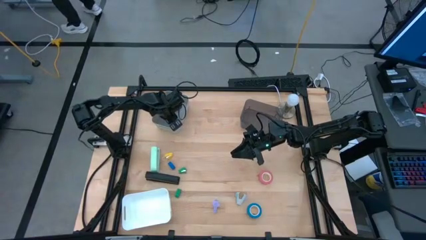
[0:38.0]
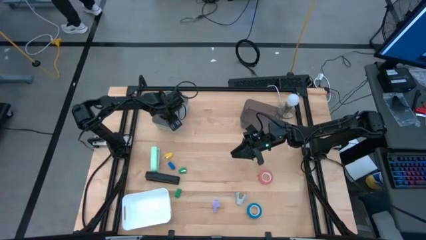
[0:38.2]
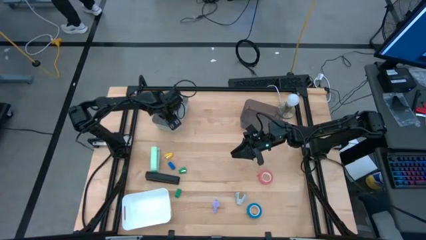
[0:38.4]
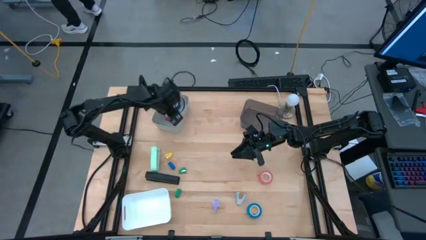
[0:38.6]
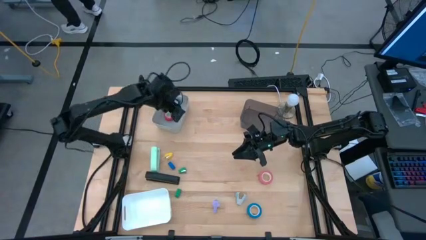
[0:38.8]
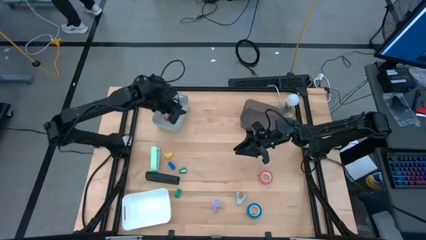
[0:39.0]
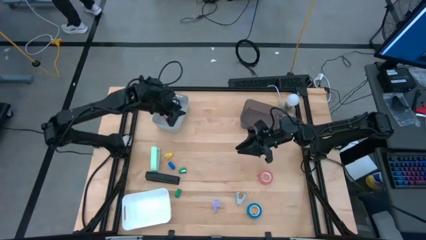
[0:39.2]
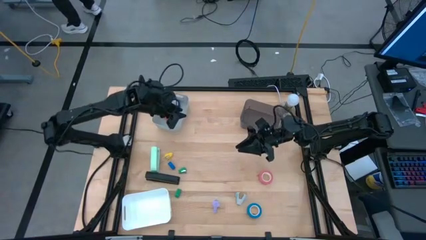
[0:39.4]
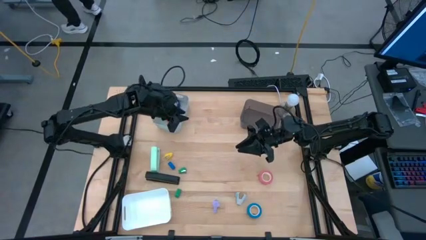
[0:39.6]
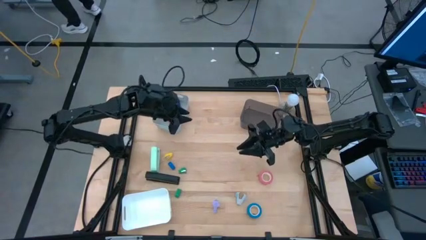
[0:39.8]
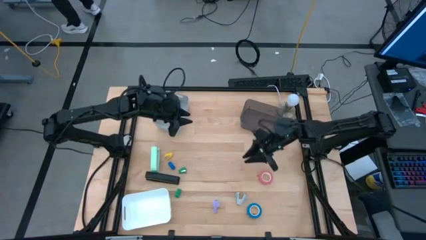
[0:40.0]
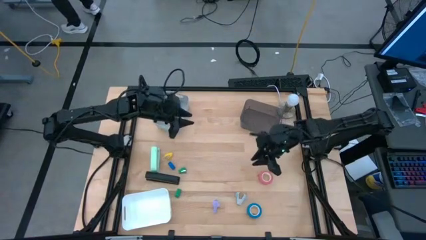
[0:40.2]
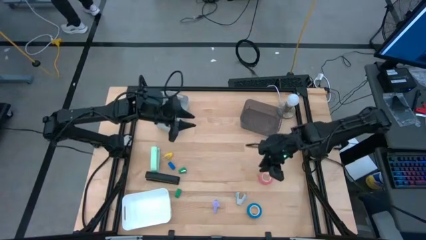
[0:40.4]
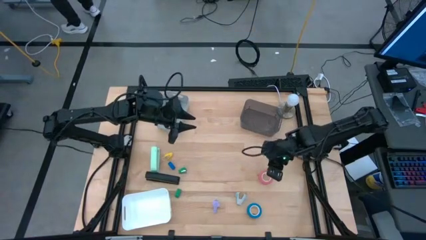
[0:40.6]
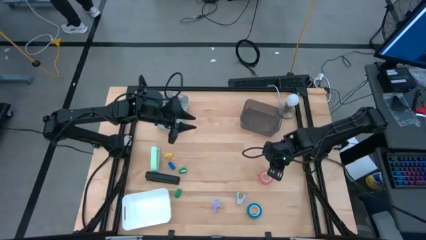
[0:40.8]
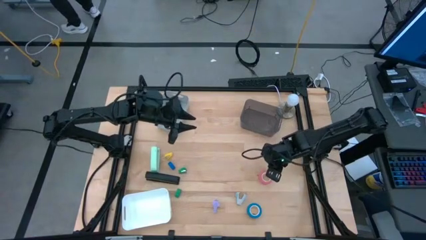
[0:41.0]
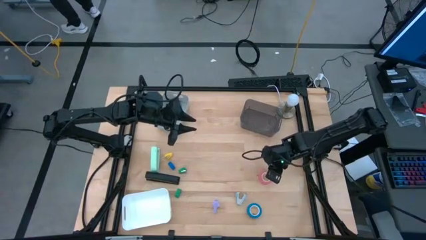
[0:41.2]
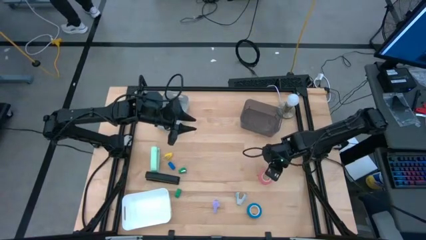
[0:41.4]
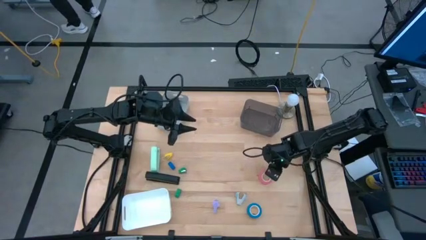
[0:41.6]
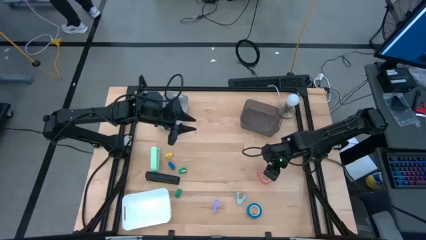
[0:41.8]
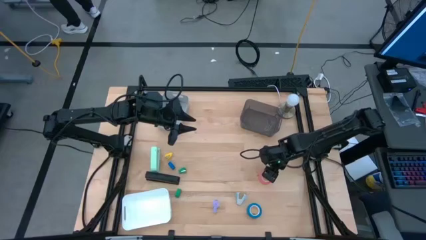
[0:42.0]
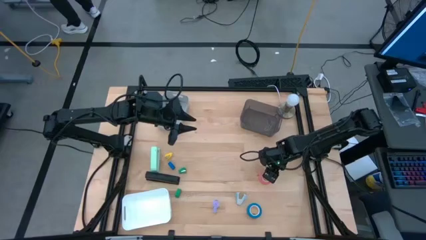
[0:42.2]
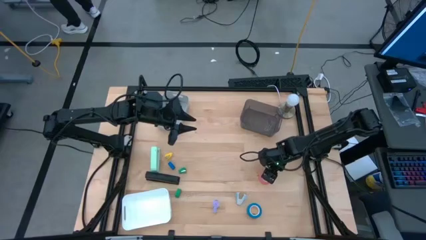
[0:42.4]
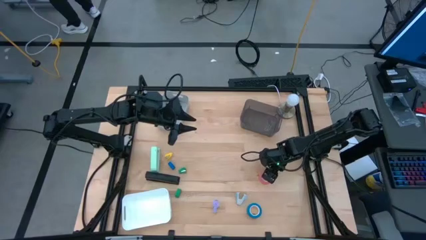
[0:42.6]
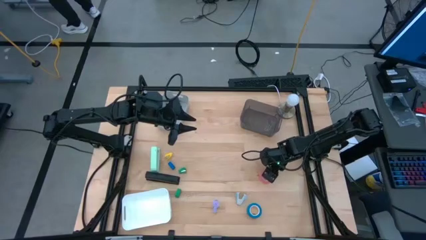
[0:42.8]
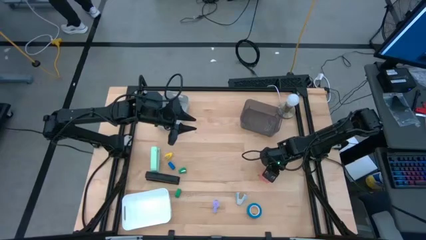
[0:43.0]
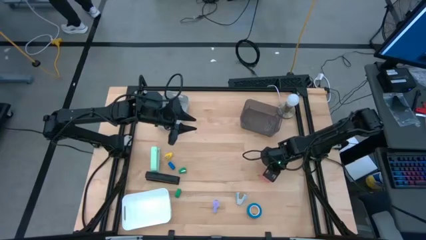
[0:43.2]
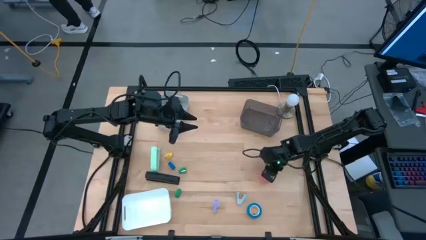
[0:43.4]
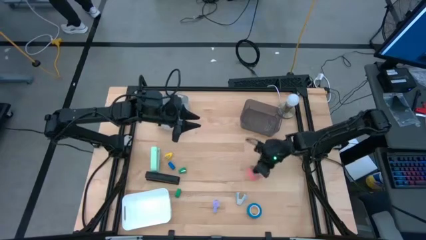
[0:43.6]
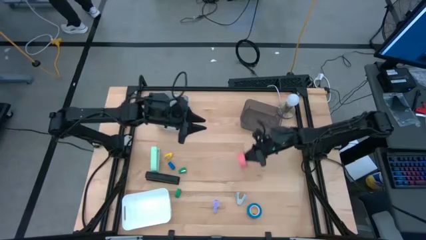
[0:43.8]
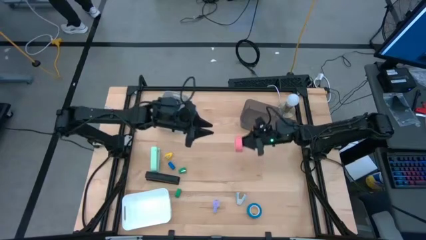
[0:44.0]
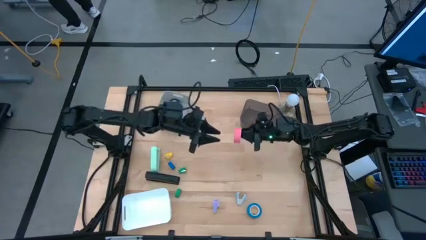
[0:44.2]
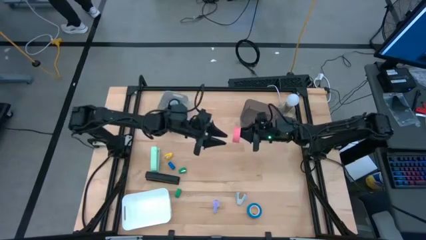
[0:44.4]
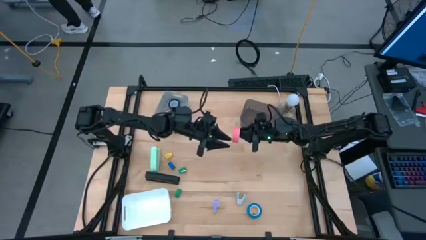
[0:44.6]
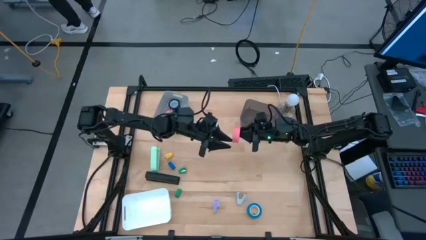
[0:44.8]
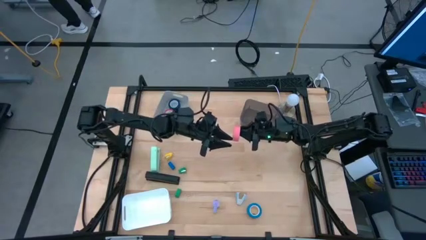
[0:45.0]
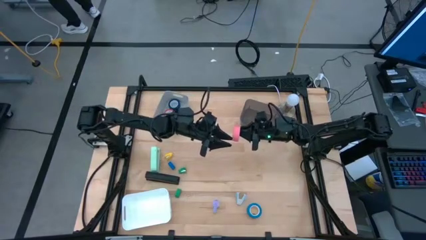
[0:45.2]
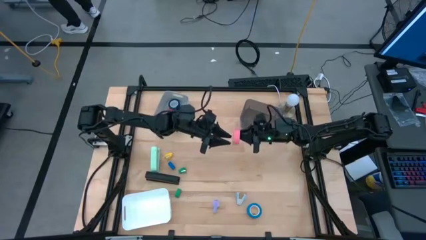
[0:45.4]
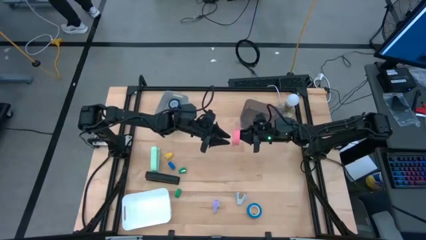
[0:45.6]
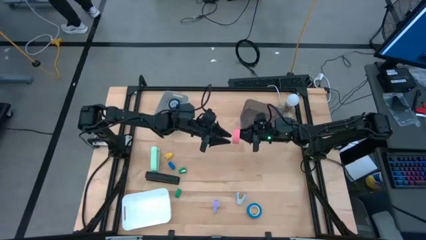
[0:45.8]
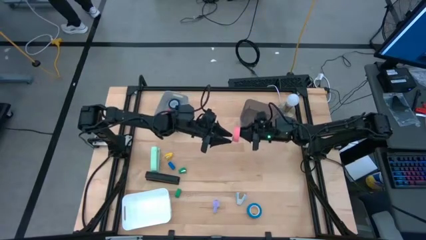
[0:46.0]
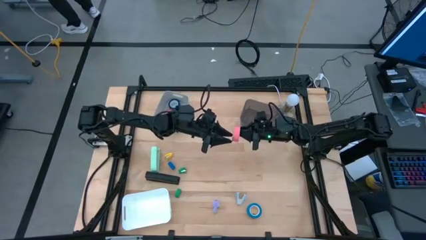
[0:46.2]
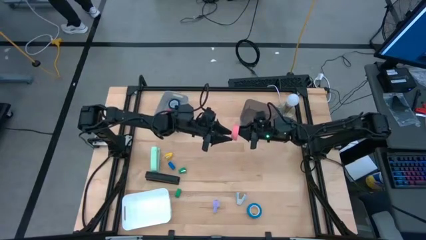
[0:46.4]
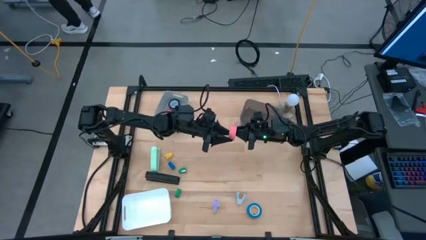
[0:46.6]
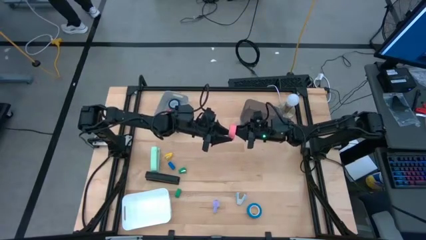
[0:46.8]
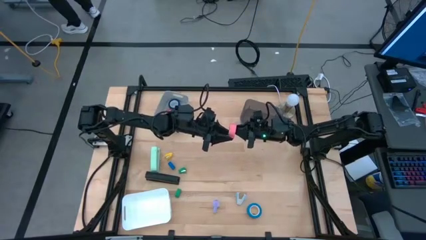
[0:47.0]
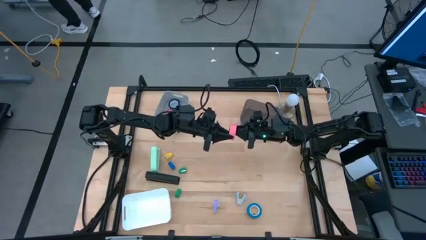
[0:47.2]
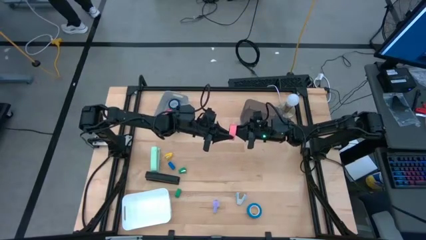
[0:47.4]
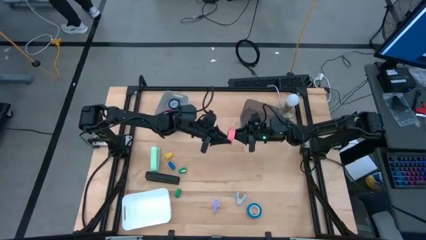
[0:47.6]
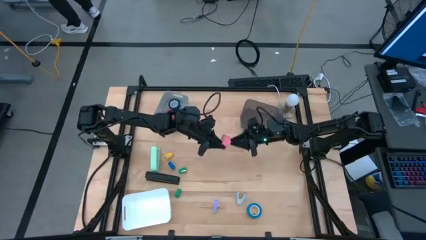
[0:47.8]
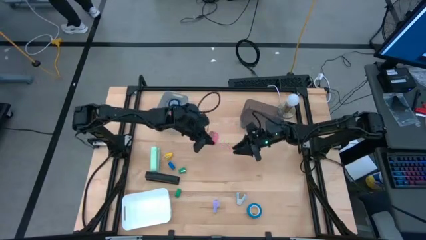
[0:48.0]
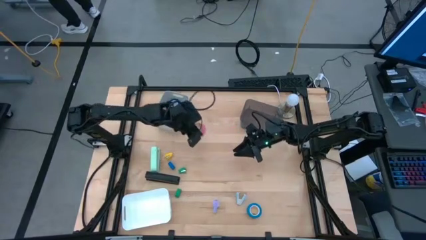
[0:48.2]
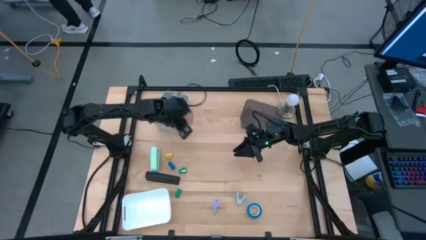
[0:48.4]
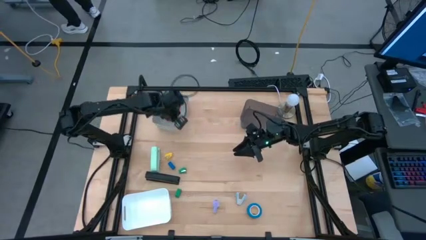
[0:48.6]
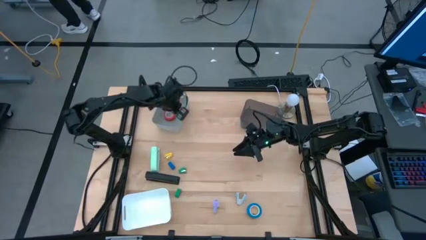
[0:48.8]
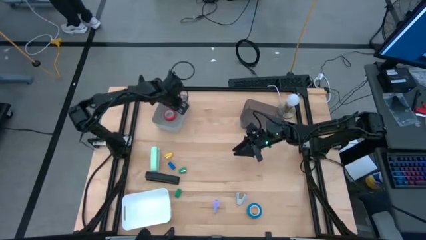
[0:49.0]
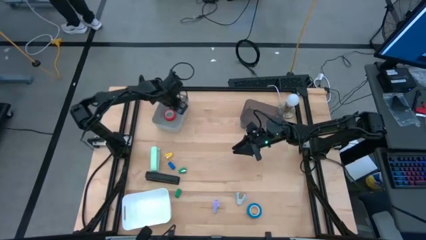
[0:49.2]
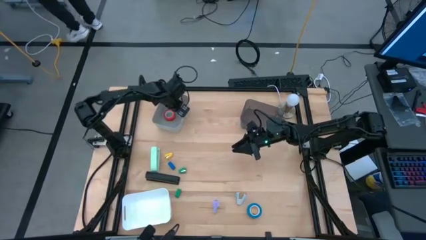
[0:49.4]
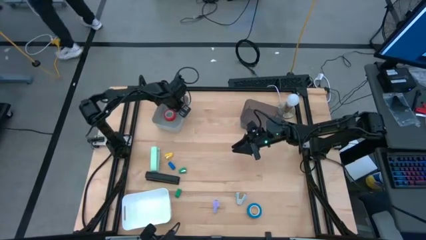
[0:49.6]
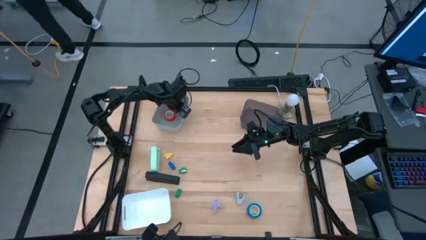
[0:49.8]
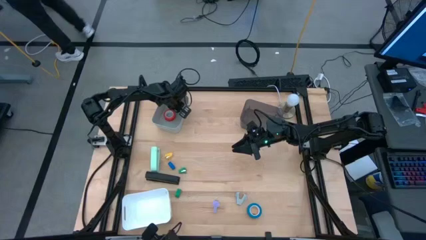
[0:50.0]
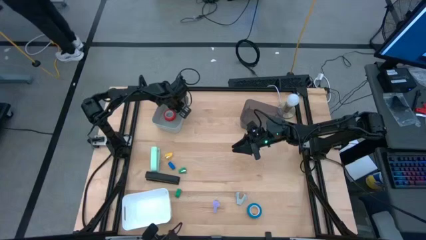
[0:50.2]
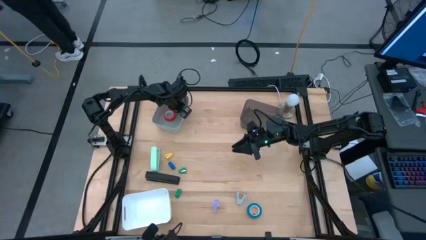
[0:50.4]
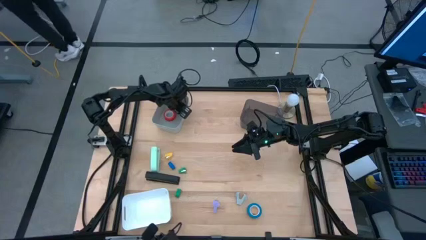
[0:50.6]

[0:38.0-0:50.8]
Task: Pick and place Stapler, Stapler remover, tape
Put the pink tape into the gray bin
